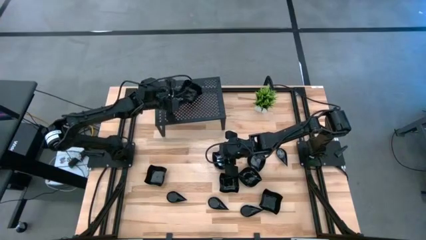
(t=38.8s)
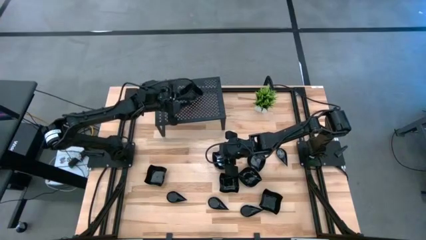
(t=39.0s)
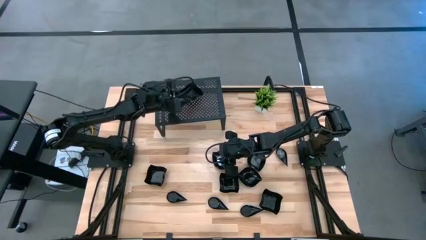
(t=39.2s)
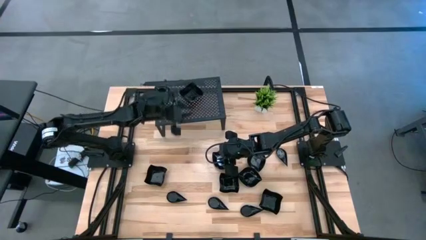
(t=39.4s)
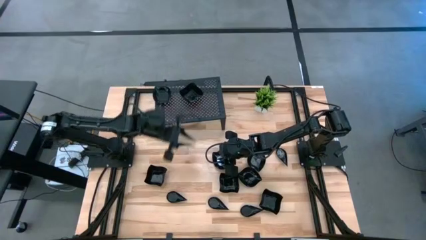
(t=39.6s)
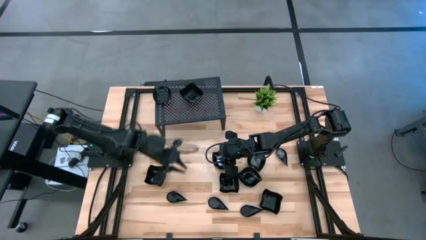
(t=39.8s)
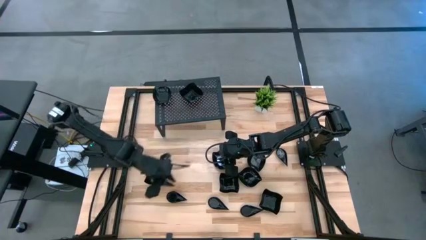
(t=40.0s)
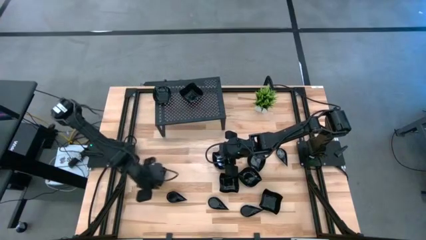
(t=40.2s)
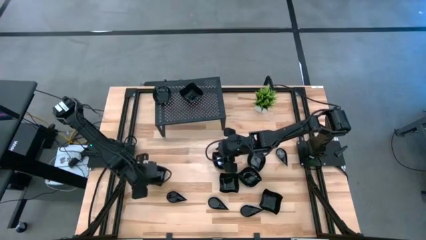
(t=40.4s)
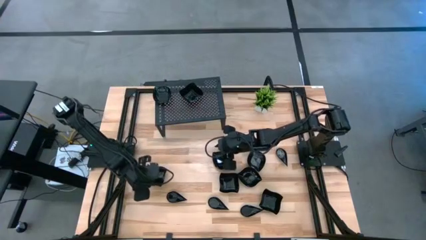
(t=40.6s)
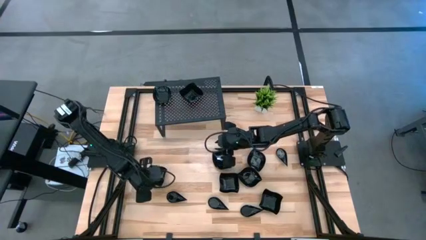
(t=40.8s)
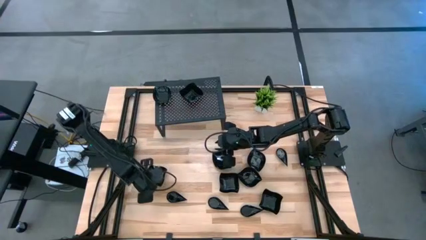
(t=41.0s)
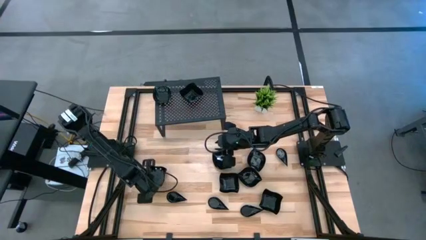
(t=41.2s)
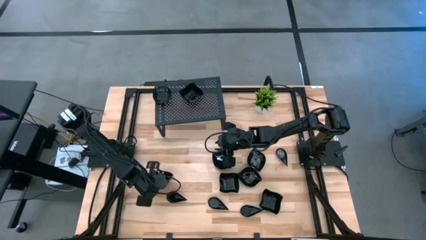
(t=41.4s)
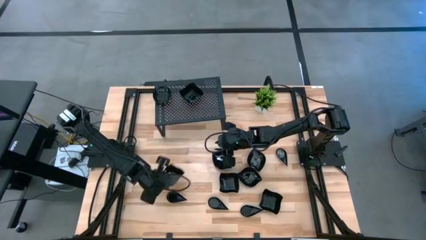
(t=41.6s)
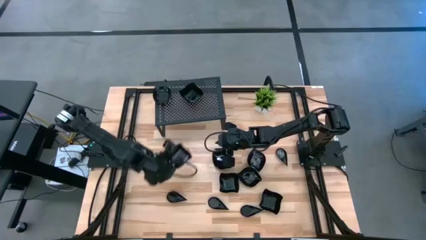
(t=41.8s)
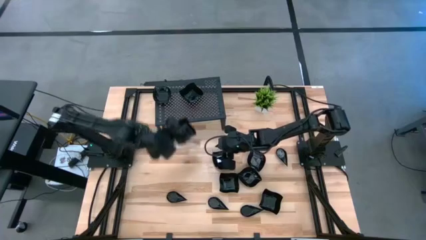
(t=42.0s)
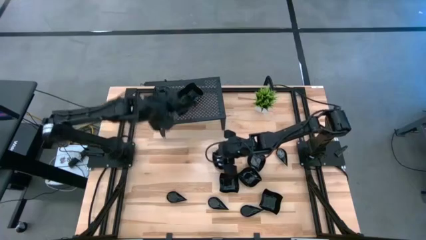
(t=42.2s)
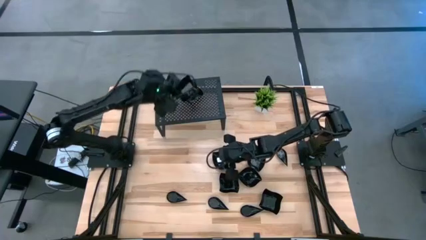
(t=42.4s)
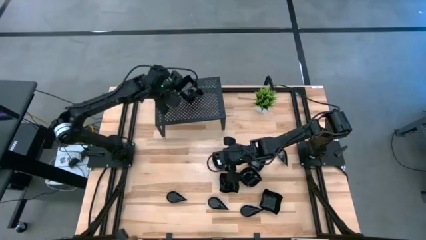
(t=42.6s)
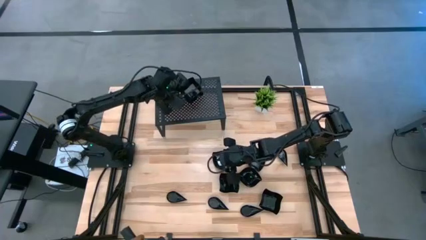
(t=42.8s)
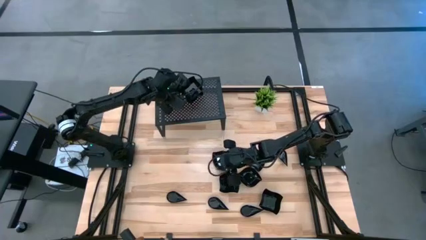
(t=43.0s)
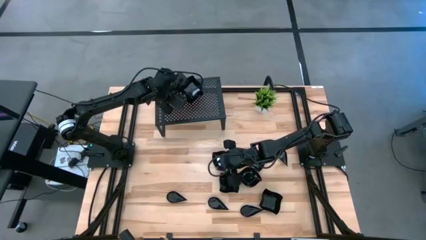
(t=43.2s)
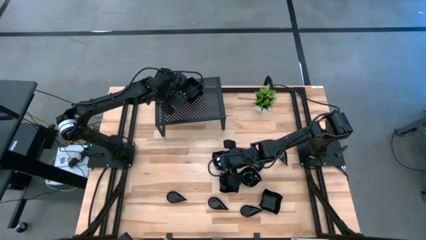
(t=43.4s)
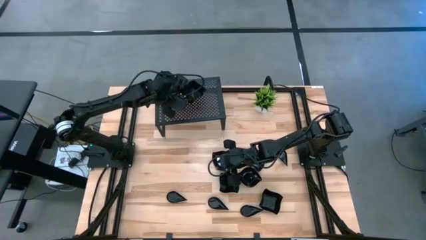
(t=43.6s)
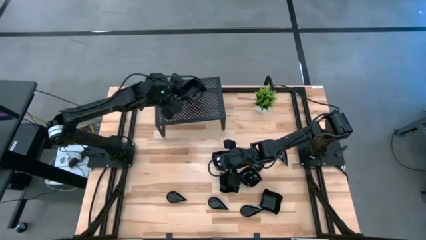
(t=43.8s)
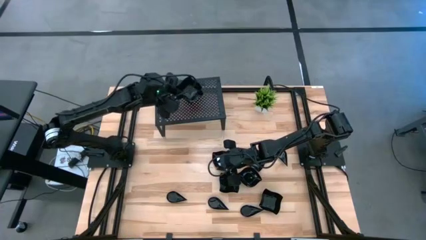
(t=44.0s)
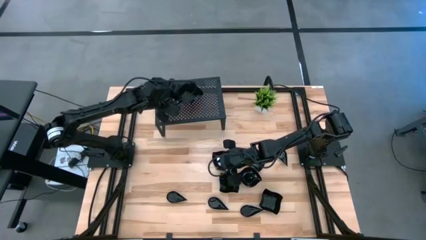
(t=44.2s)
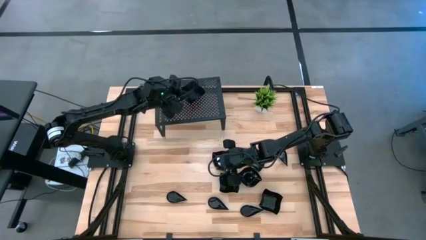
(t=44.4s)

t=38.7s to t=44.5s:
Task: Pick & Place Mini shaped plates
Stack the black distorted square plate on top of the black distorted square plates on the shelf

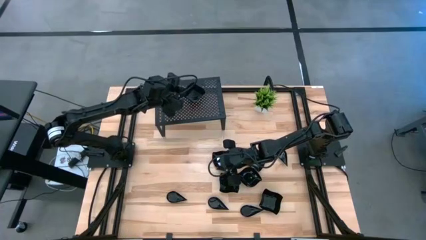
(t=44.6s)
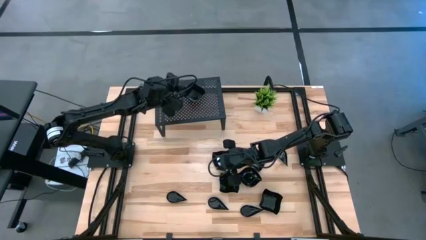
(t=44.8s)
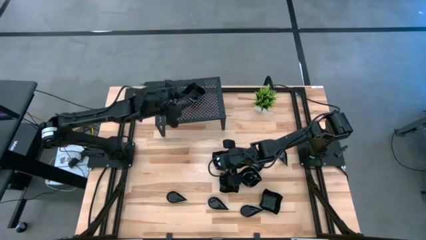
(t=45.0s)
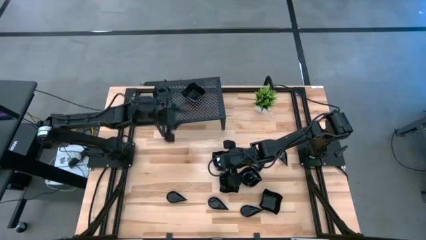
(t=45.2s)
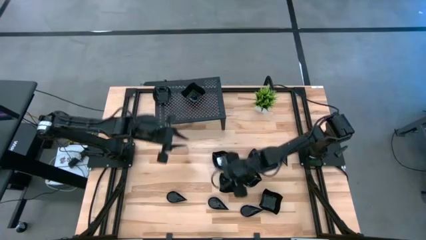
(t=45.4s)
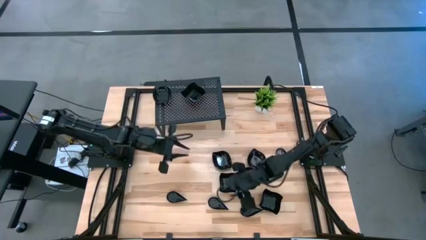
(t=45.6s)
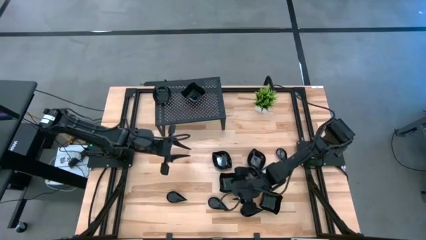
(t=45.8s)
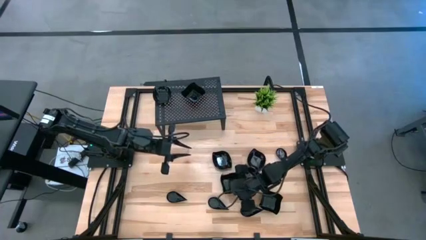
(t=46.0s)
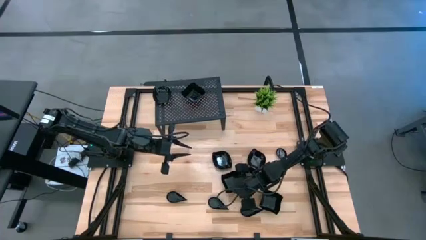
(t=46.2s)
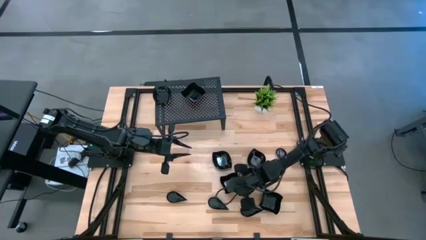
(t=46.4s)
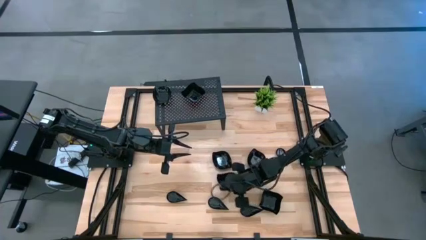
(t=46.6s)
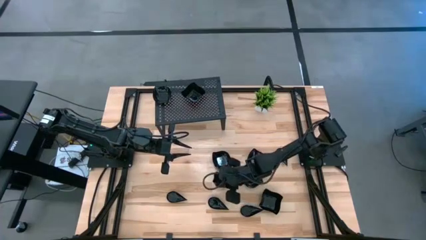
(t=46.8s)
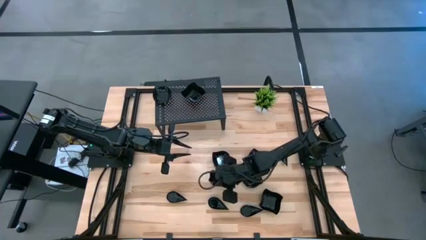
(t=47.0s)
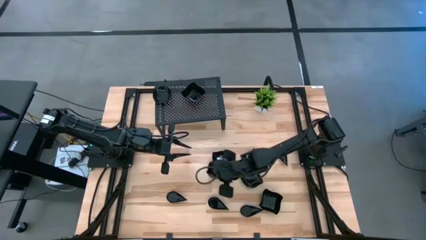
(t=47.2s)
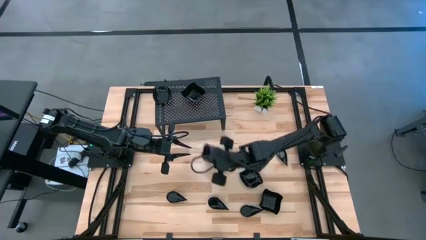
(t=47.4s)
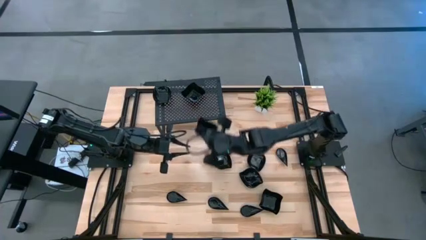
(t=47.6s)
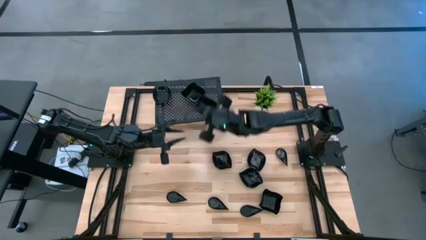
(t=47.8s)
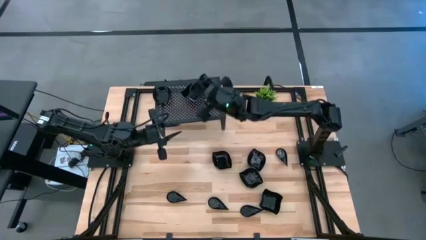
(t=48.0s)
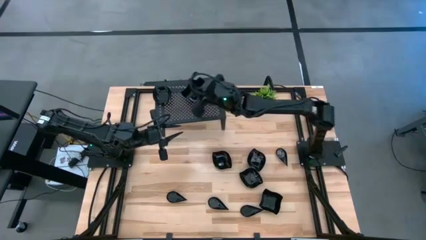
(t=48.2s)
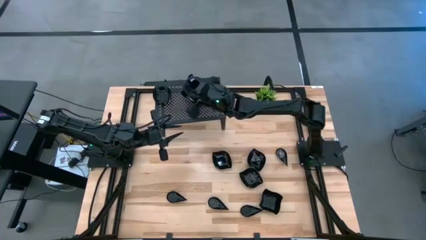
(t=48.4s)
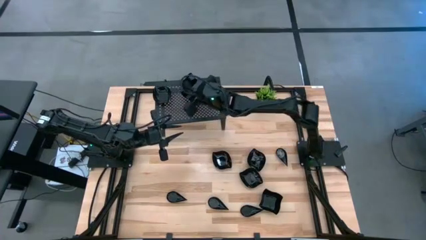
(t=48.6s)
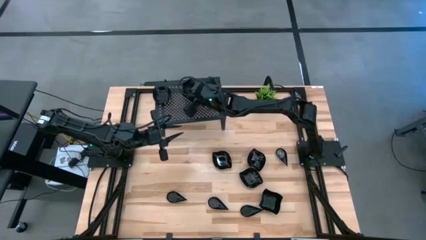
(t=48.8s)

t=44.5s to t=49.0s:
Stack the black distorted square plate on top of the black distorted square plates on the shelf

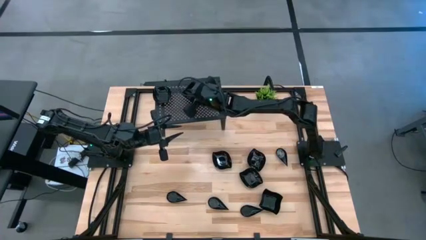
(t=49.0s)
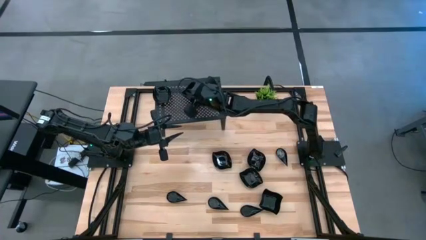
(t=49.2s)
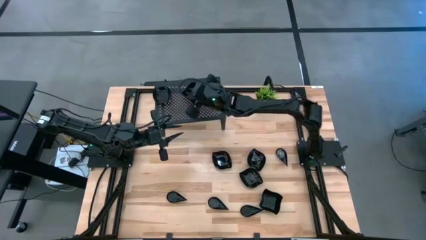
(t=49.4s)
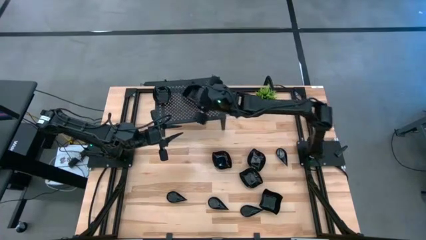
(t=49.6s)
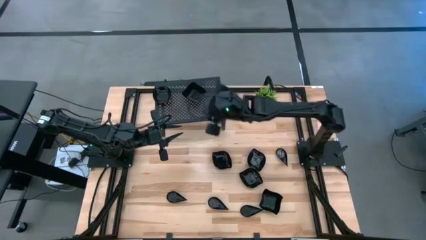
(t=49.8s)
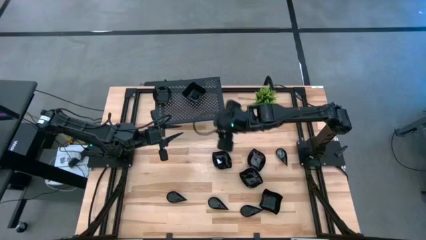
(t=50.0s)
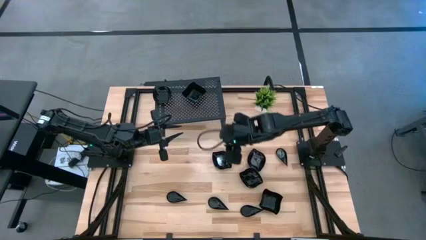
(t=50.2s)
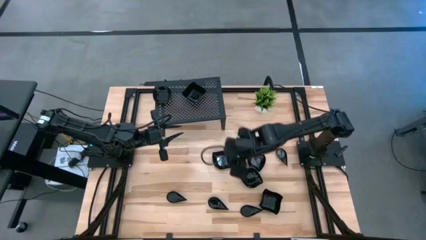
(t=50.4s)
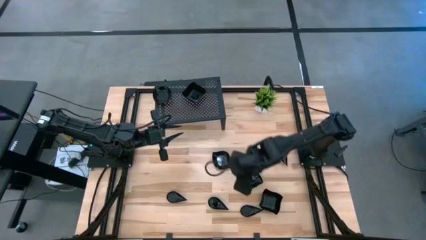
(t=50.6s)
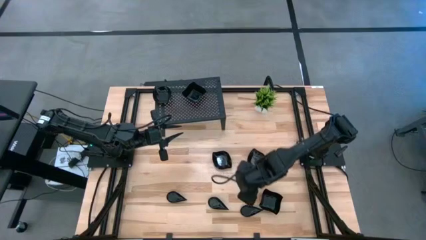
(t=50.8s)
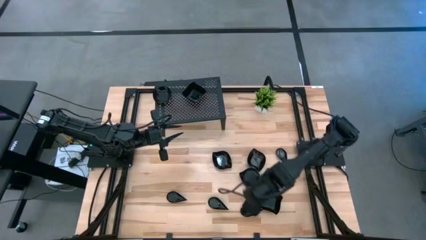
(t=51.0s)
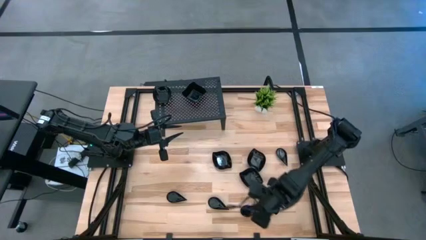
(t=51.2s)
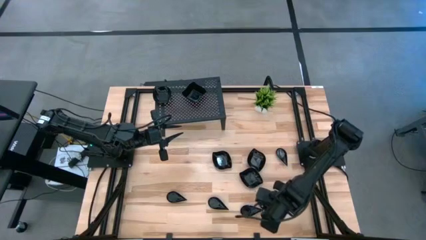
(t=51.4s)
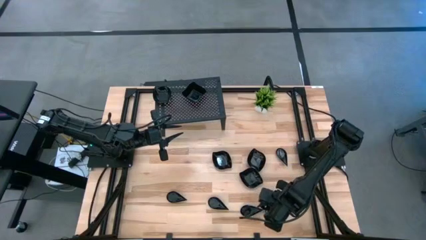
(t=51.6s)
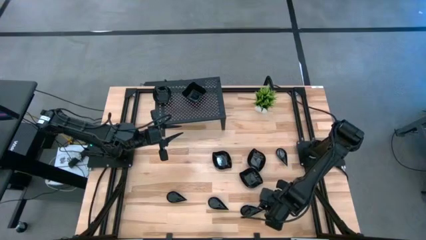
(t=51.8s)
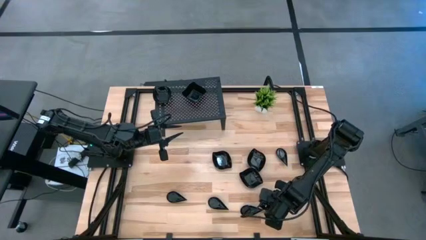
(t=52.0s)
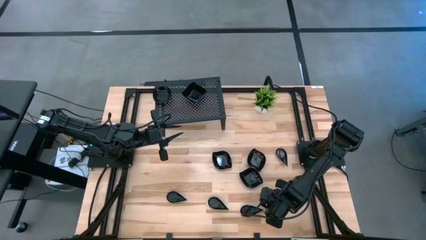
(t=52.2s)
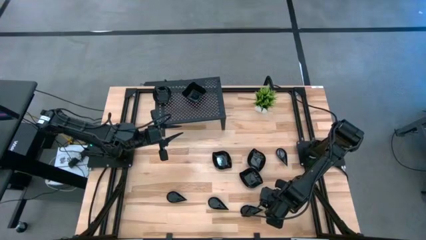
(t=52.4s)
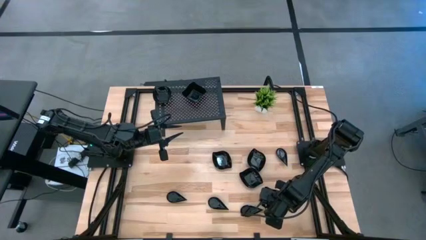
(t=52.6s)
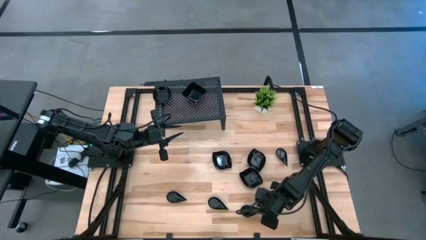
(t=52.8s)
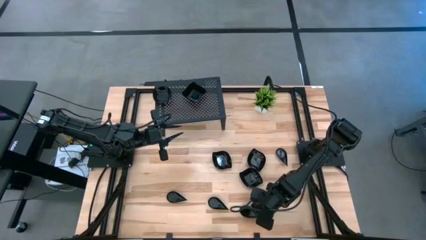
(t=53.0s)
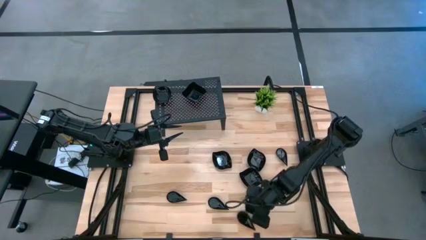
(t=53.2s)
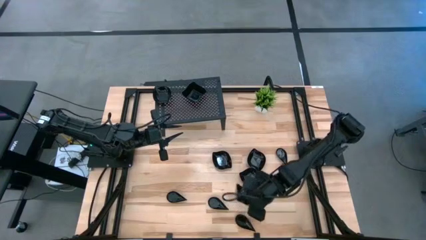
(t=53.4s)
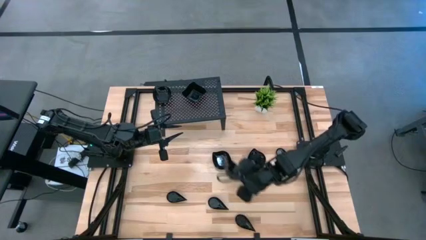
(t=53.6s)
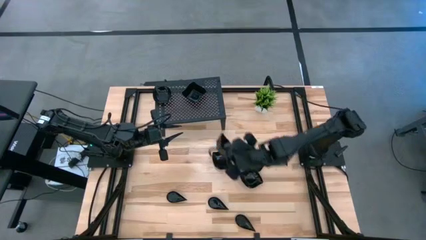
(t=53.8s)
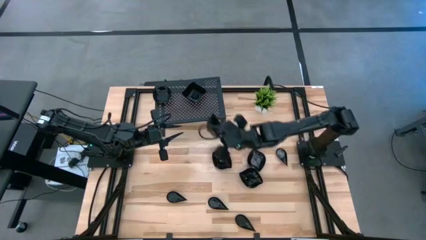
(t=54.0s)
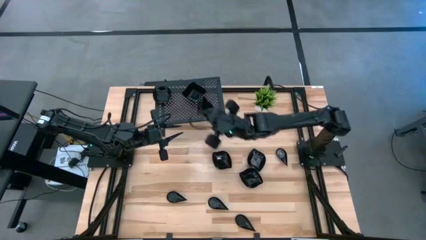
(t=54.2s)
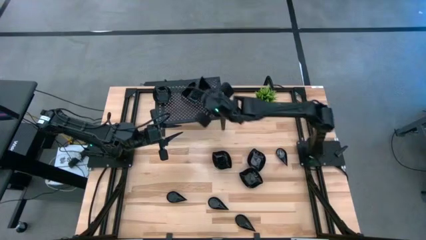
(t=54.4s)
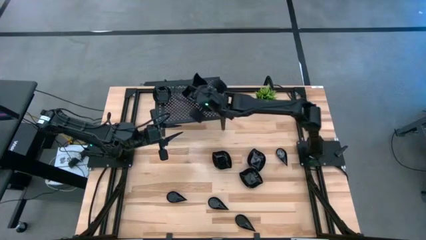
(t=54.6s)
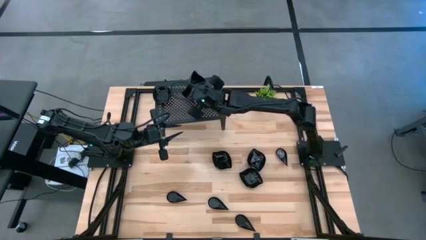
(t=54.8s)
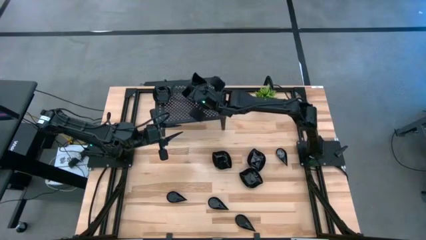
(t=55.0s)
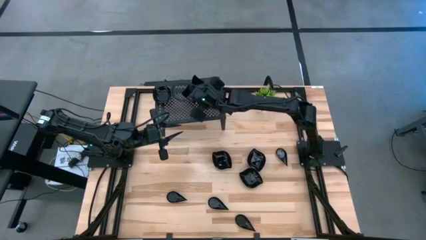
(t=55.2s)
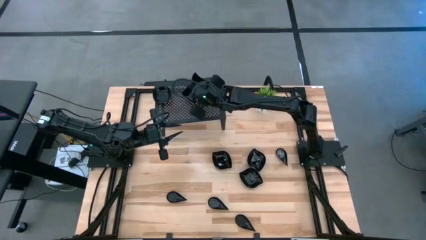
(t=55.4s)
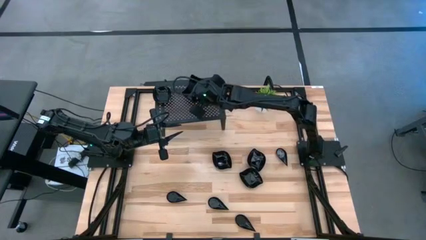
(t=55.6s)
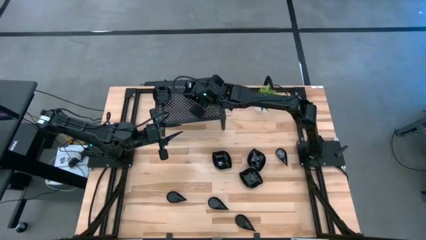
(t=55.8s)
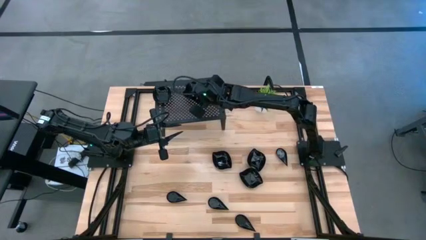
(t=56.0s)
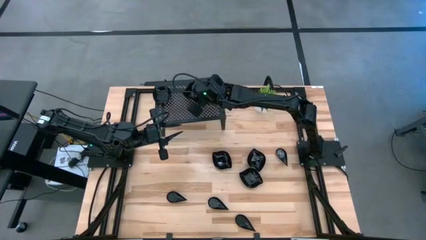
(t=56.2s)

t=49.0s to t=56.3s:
Stack the black distorted square plate on top of the black distorted square plates on the shelf
